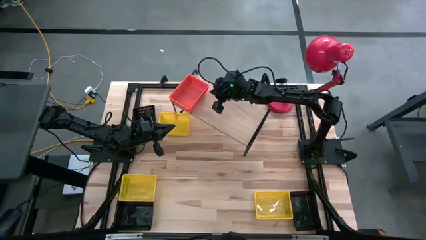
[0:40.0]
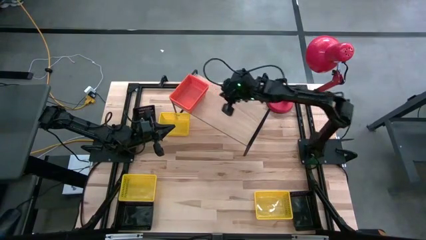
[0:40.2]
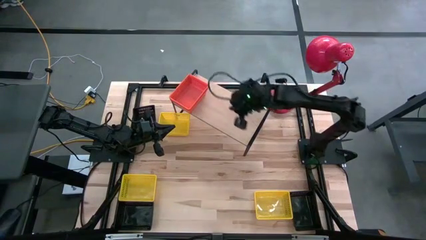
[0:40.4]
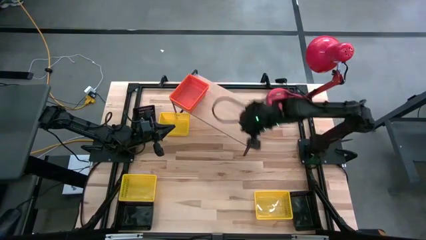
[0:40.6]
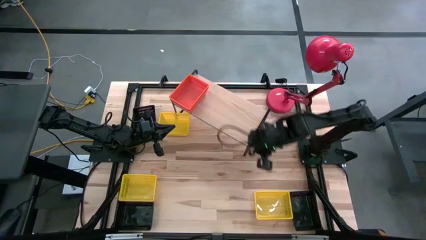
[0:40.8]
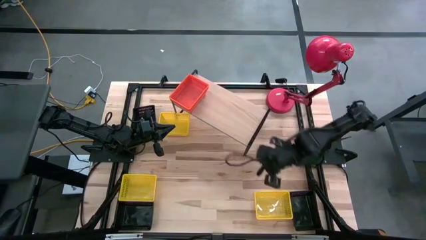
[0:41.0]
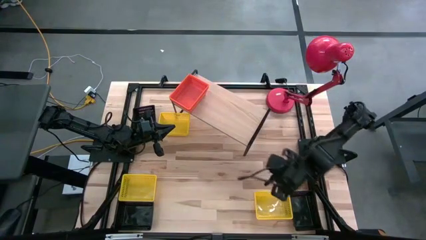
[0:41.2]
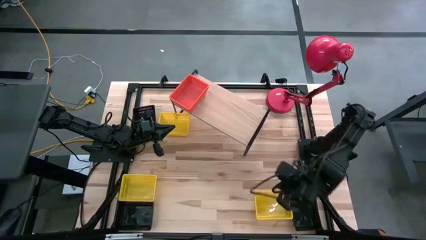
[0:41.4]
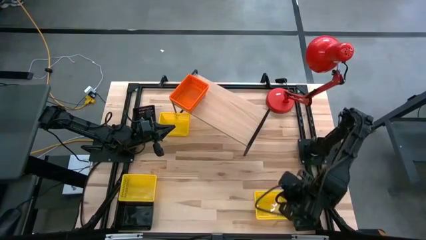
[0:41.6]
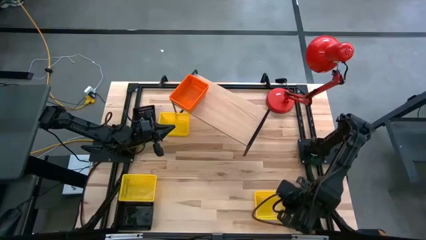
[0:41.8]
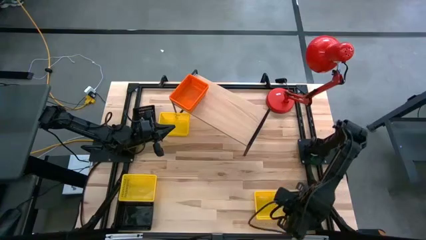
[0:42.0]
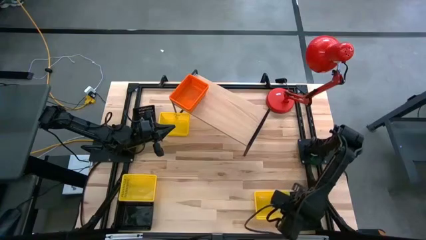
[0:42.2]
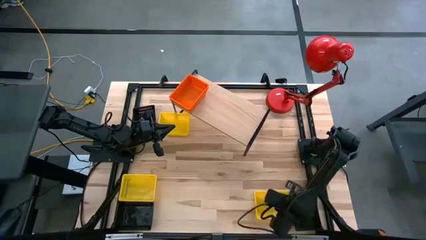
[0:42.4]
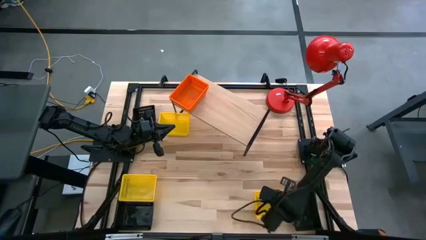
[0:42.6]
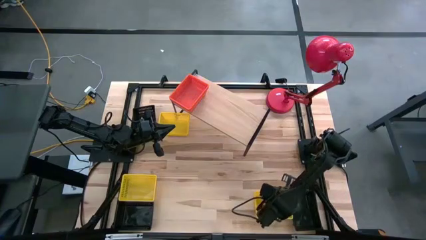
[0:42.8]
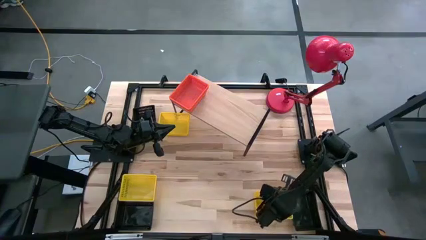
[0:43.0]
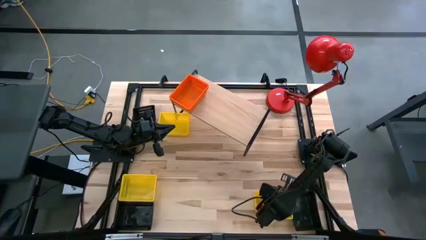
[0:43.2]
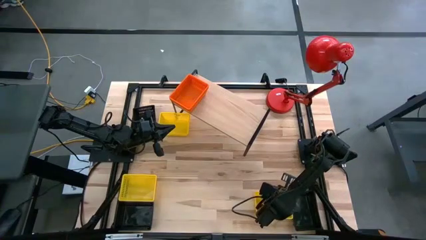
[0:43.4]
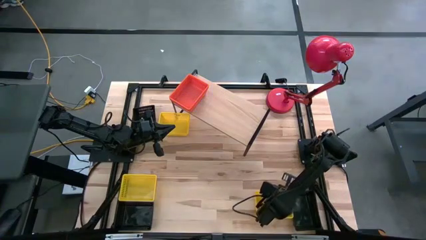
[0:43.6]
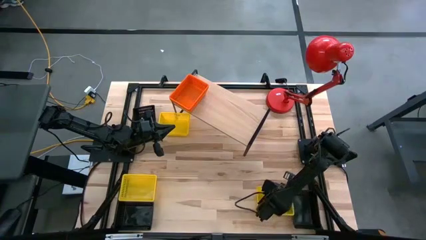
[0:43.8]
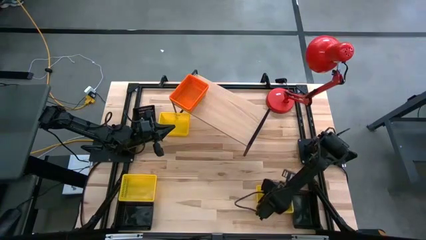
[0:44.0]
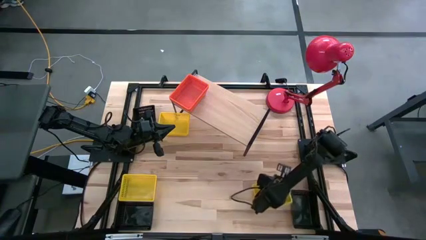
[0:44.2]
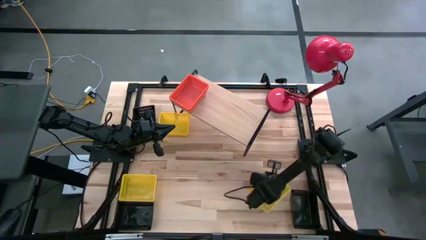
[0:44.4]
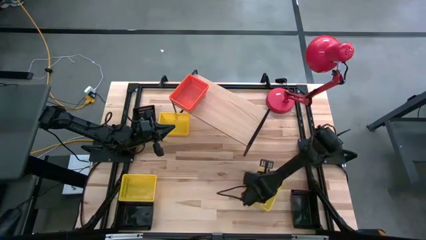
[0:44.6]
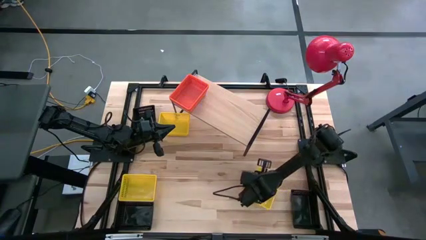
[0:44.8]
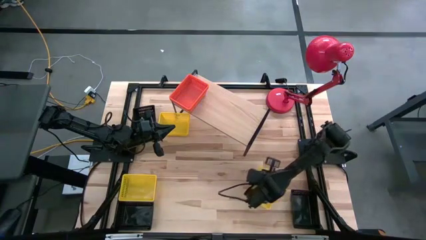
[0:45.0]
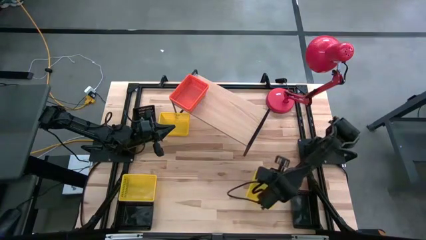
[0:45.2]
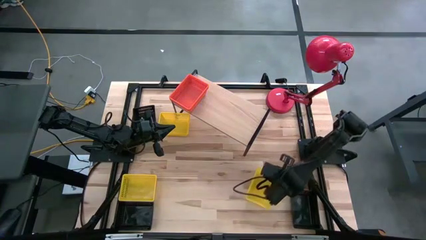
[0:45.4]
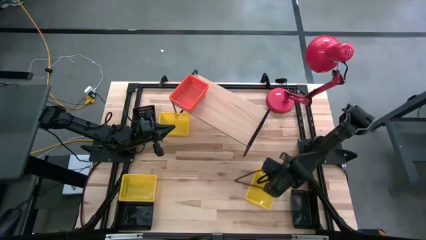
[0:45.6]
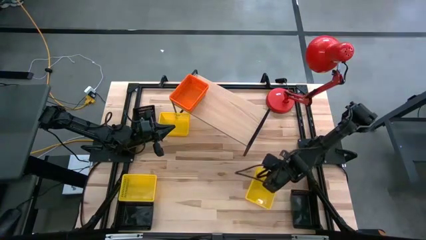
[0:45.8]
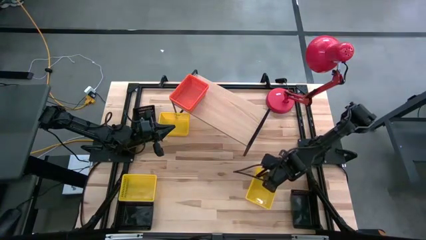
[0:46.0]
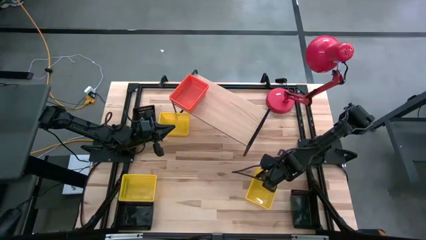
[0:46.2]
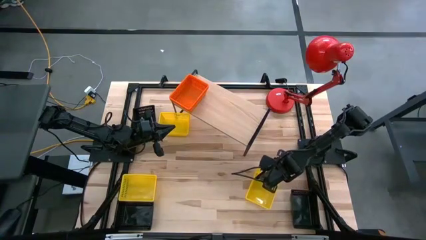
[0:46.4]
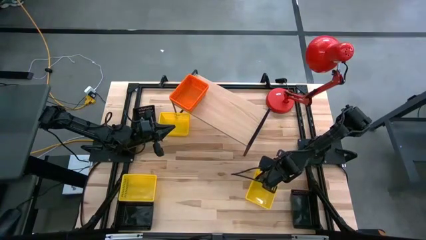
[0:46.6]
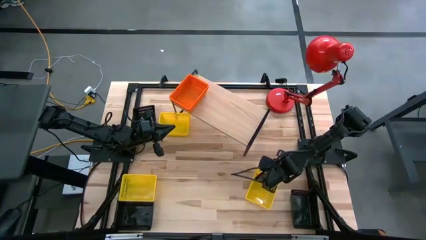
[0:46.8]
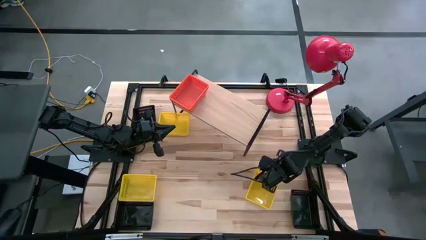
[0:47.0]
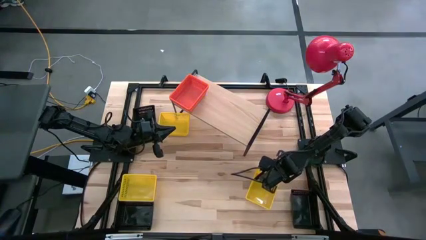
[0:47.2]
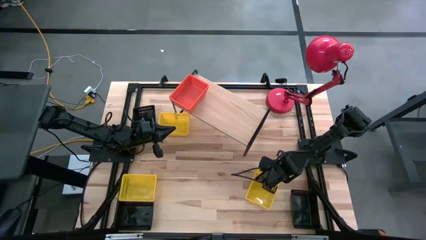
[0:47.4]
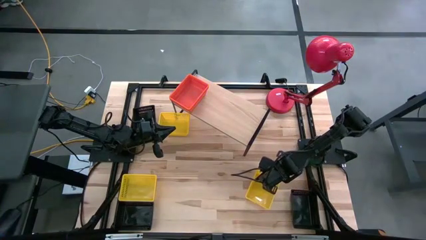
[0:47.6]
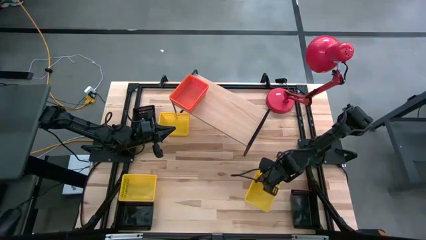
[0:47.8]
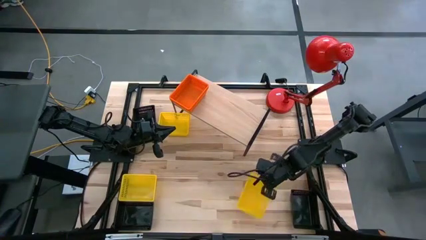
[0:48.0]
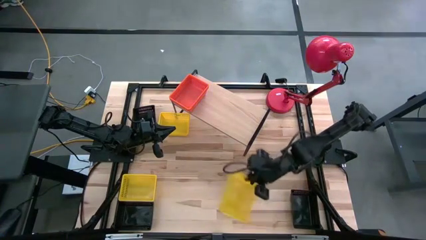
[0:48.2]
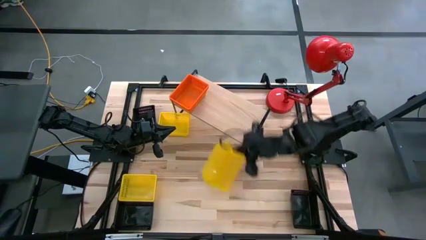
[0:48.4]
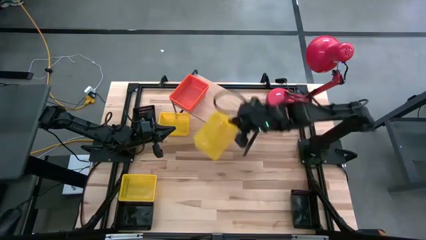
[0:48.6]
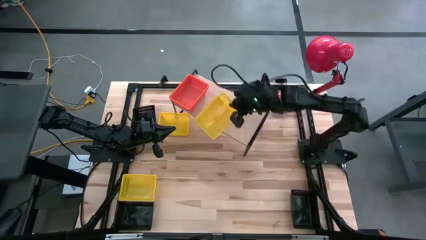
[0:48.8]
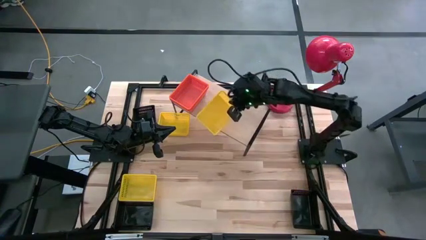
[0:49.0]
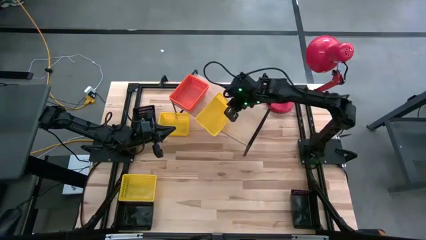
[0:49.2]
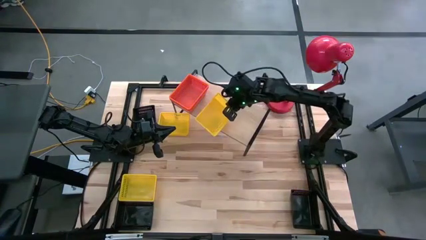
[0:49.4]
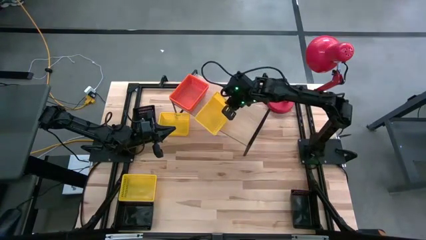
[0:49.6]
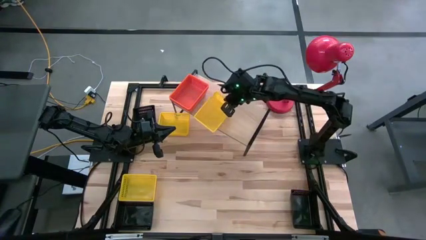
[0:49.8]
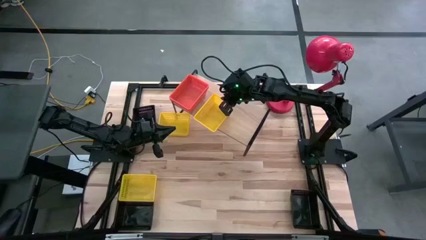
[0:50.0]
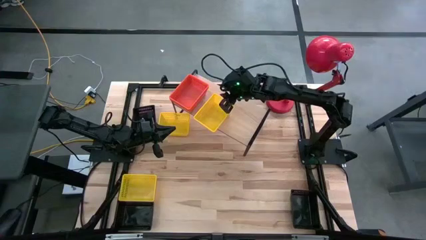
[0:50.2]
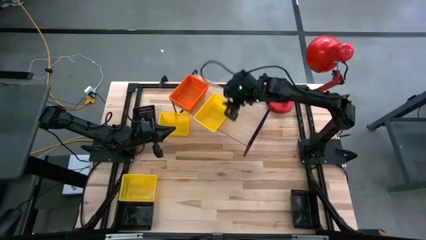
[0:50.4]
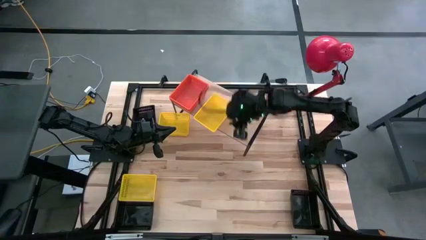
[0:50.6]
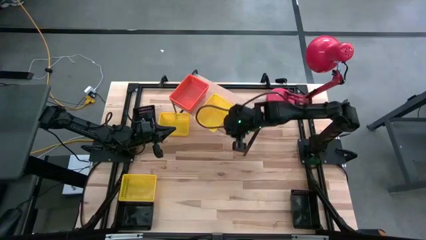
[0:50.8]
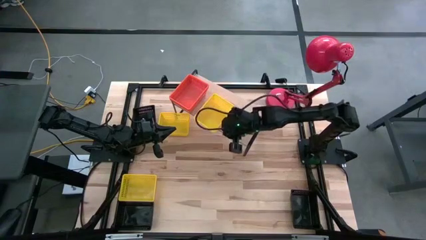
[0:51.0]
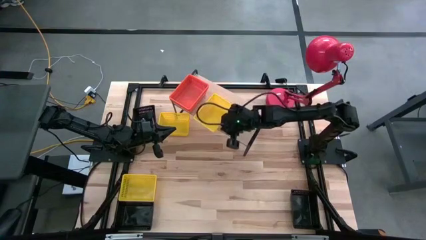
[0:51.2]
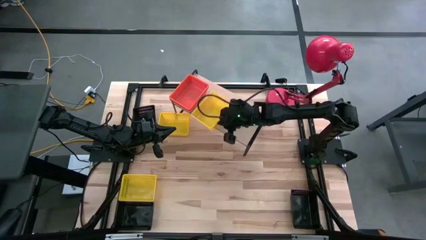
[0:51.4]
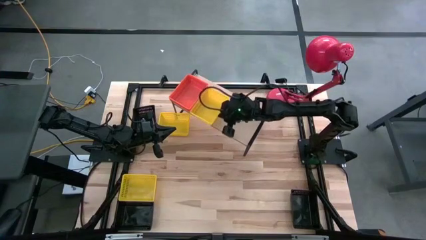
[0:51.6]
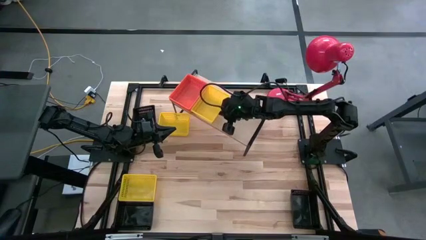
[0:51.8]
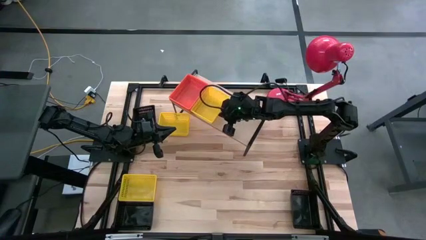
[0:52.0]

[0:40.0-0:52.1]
Task: Stack baskets on shelf by color
Put the bottom right yellow bin on the shelf
